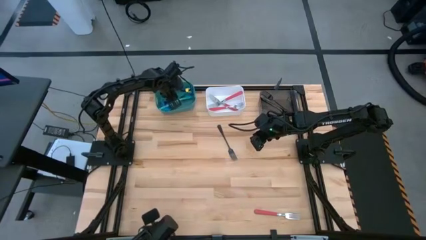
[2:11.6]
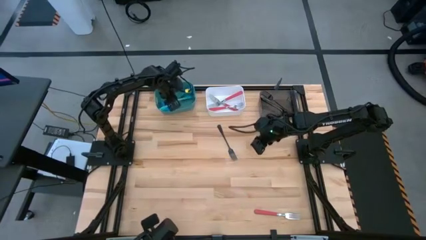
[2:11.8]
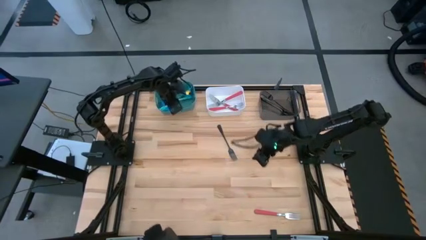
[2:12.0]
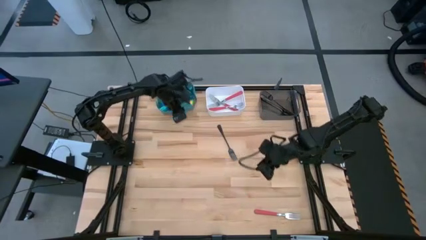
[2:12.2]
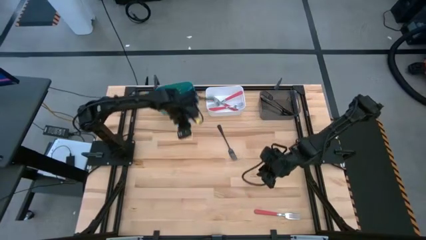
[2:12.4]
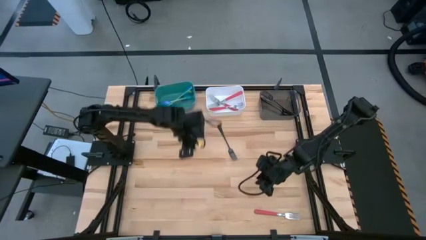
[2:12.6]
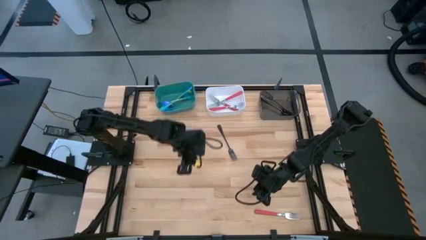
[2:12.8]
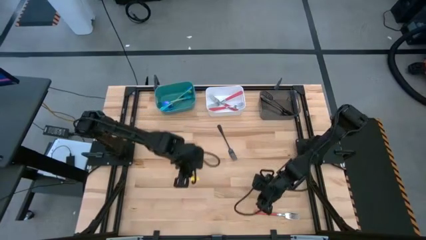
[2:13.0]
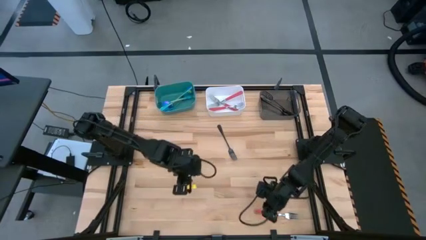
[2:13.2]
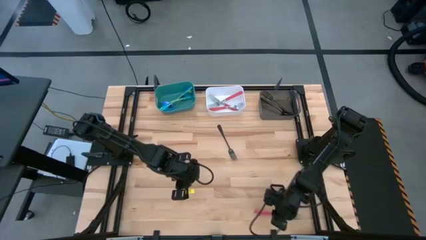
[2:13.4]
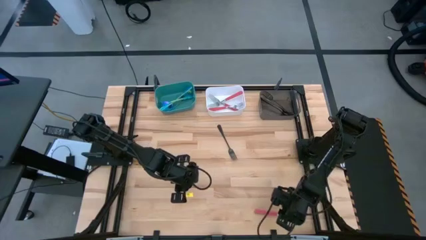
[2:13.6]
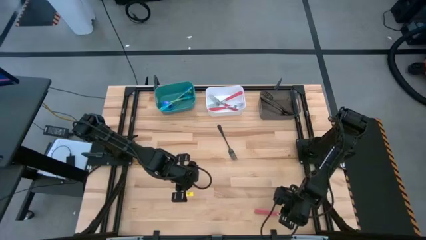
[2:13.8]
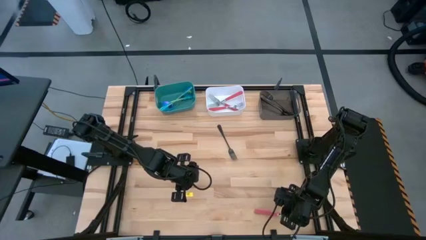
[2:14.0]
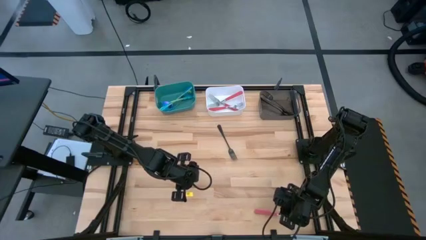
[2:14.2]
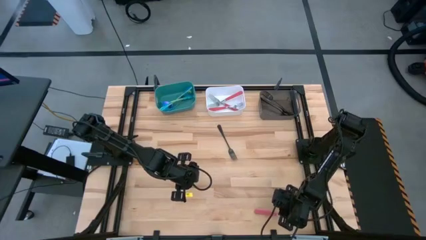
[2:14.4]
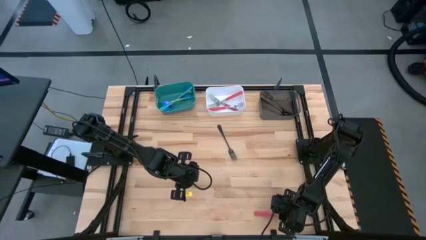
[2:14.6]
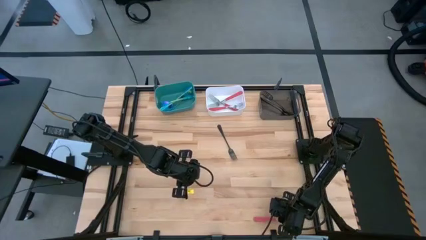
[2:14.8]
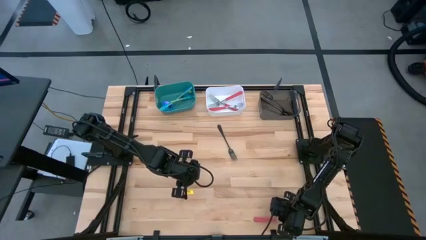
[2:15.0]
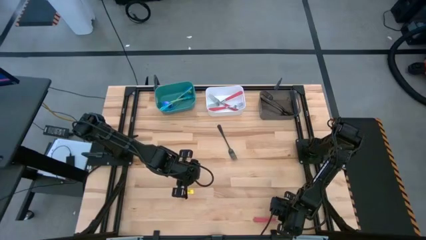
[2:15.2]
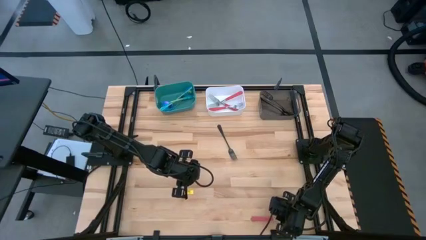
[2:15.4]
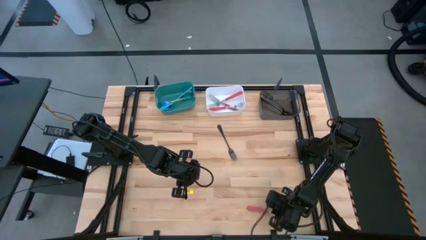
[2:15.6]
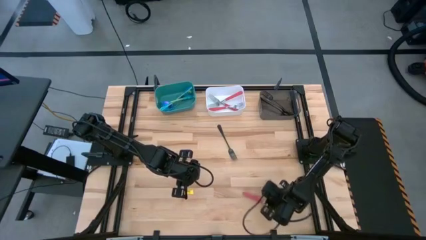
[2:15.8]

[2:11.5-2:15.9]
Task: Sort silverware by color (type)
Put the red fork into the white bin

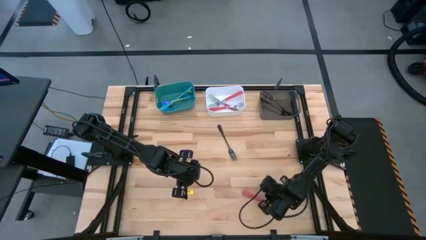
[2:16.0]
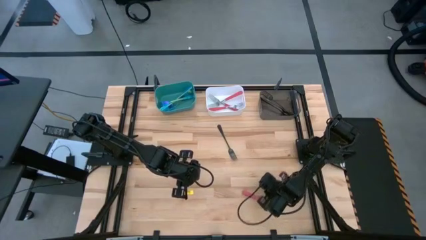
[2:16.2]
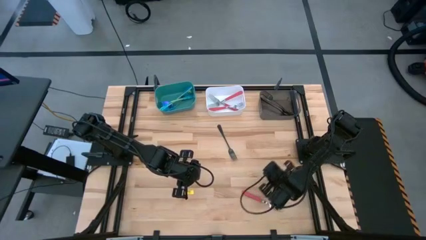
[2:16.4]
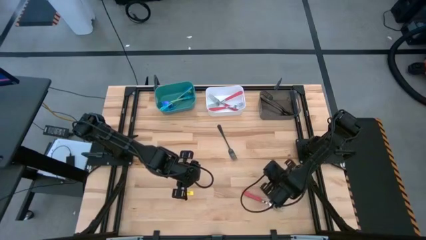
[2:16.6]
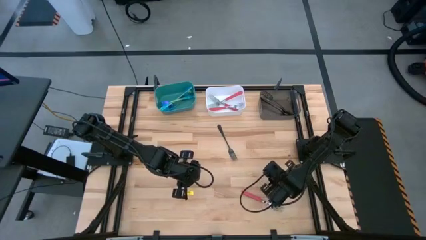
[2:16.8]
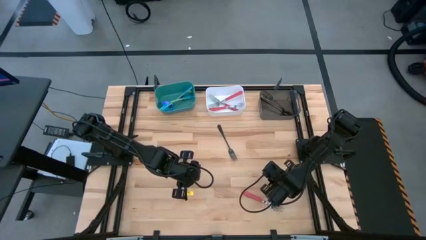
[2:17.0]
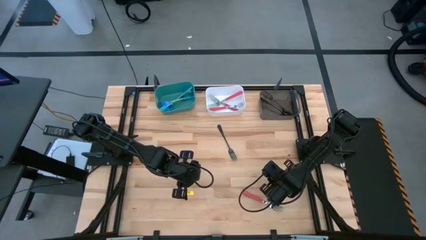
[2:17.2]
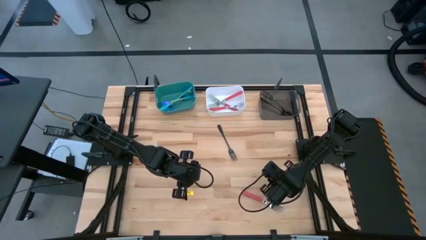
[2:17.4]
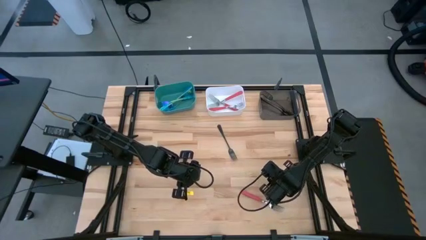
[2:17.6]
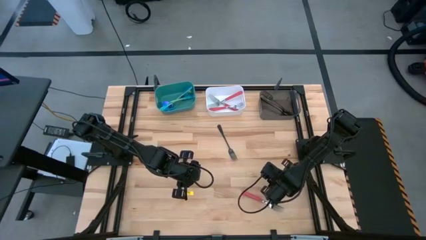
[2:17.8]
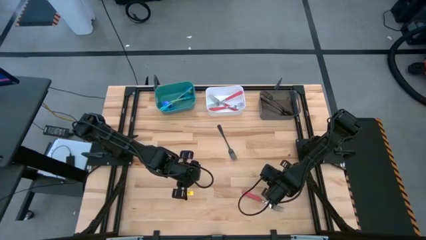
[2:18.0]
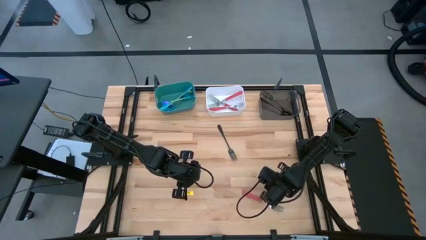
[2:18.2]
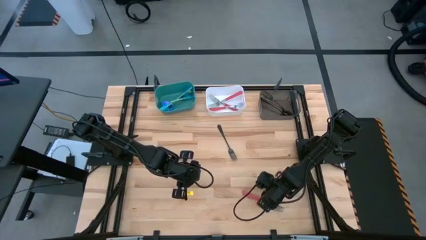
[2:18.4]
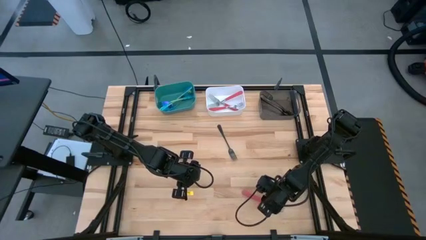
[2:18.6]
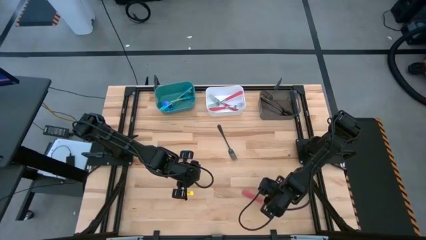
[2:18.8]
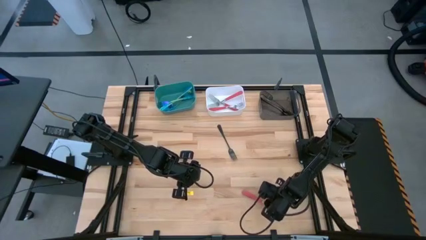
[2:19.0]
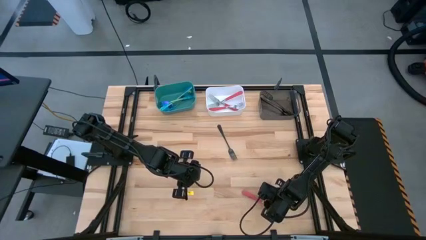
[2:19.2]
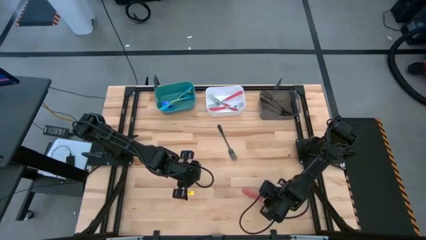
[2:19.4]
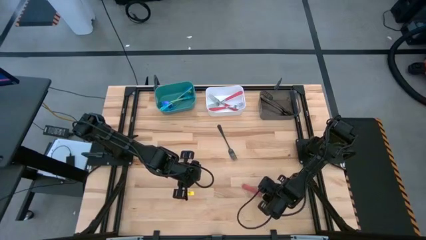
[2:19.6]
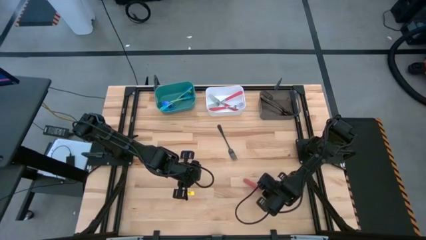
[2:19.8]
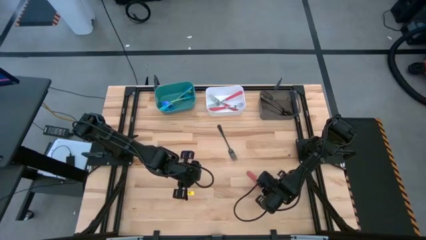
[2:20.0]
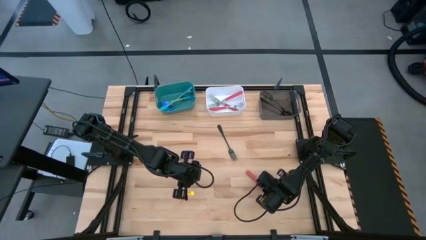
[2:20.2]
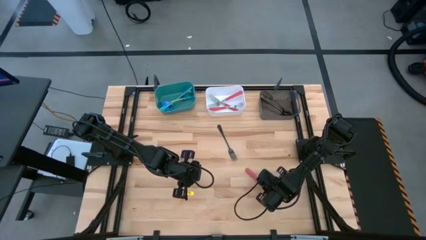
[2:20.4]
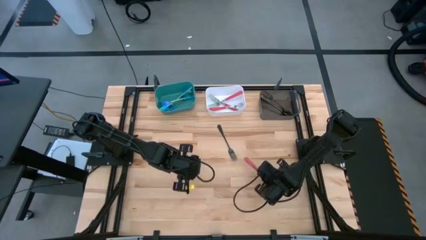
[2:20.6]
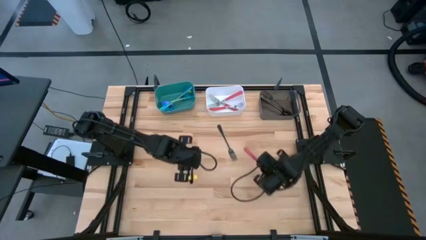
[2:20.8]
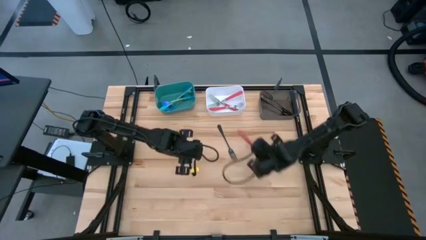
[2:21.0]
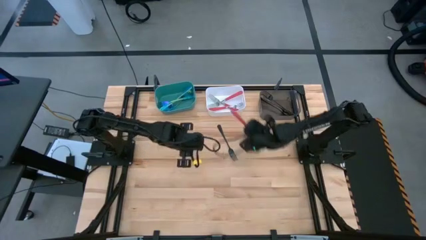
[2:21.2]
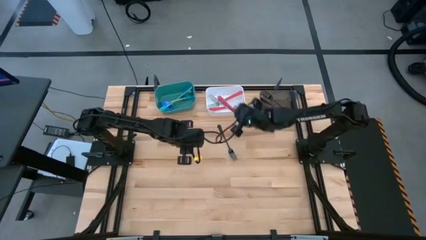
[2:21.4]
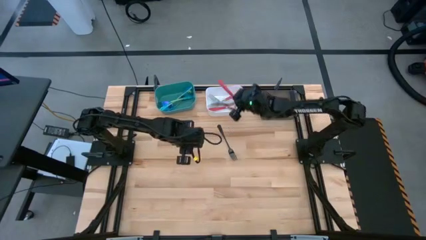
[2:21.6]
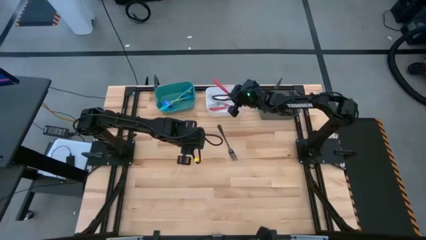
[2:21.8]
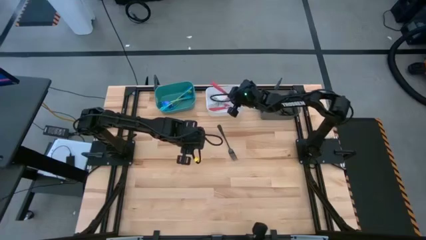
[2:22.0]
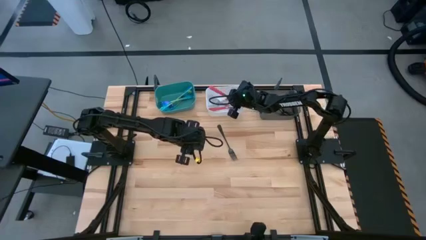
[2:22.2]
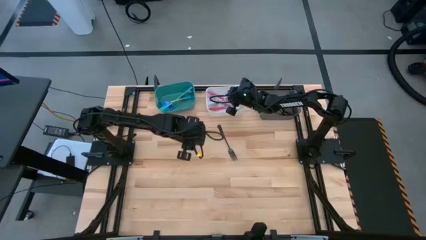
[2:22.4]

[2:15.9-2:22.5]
Put the red fork into the white bin

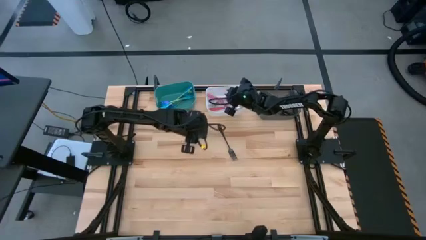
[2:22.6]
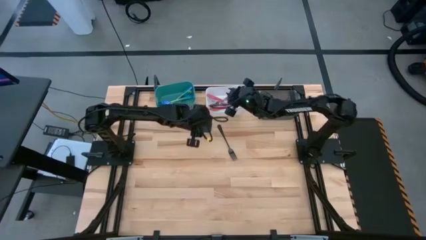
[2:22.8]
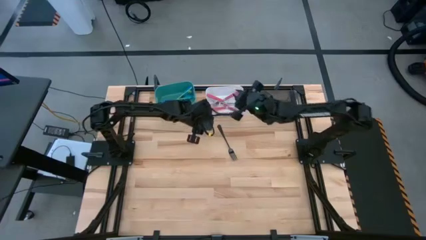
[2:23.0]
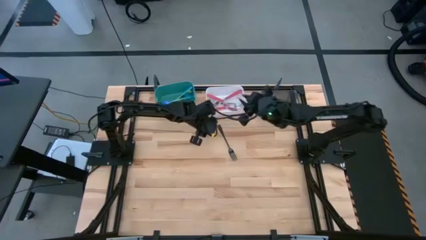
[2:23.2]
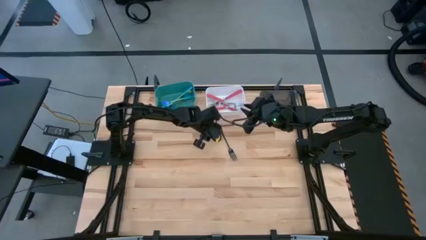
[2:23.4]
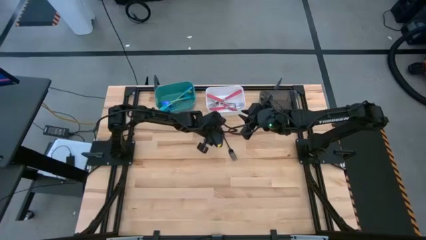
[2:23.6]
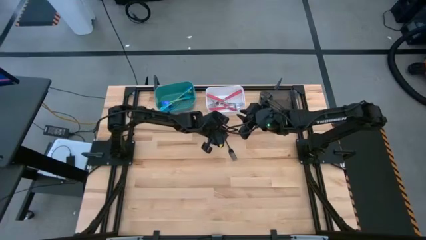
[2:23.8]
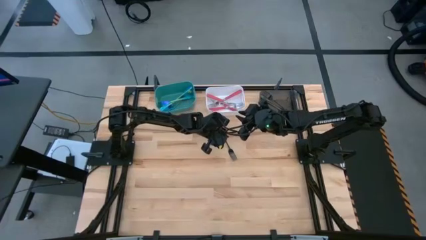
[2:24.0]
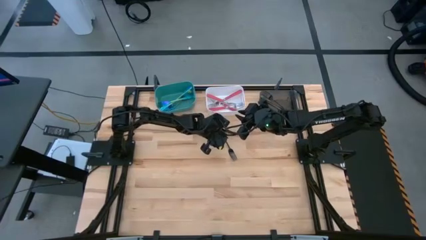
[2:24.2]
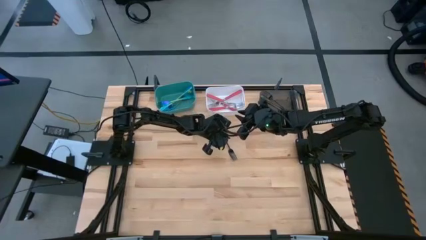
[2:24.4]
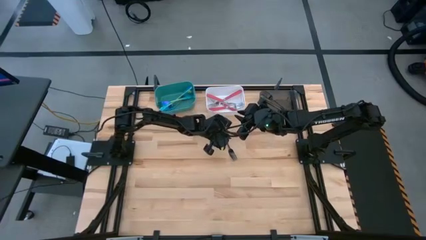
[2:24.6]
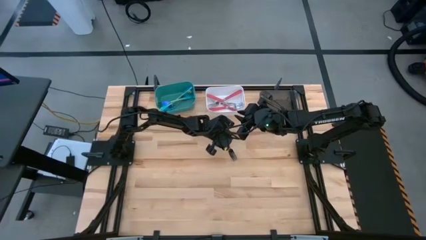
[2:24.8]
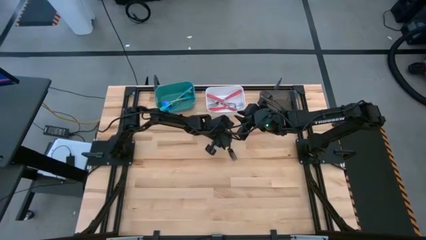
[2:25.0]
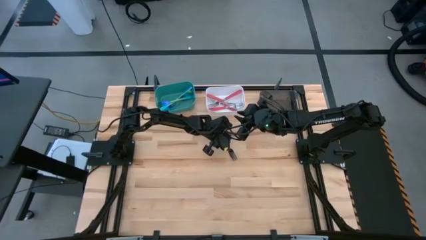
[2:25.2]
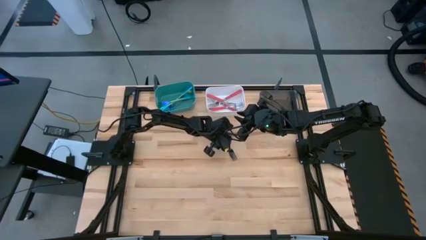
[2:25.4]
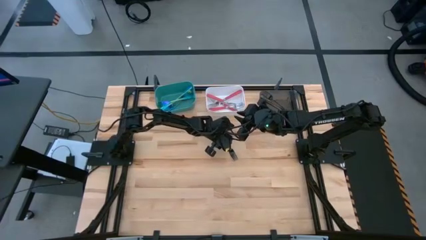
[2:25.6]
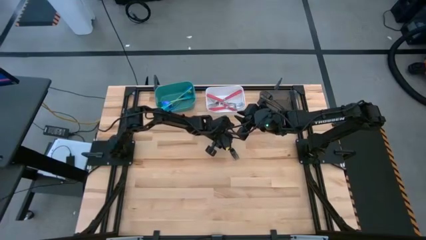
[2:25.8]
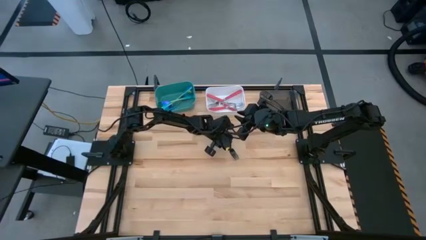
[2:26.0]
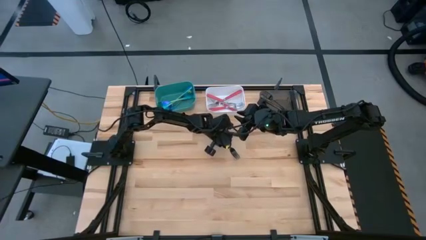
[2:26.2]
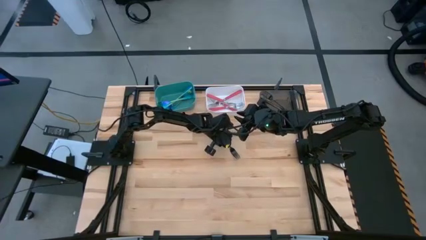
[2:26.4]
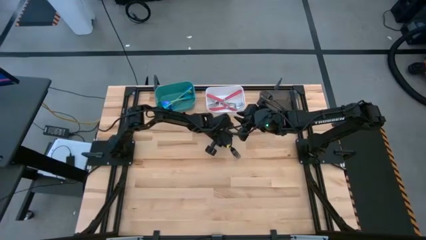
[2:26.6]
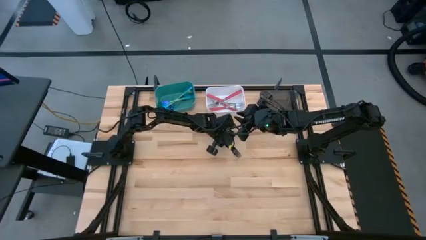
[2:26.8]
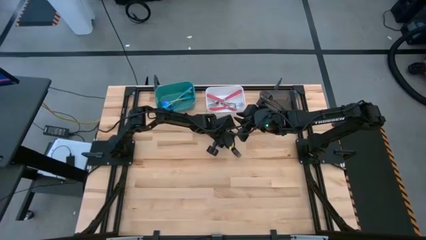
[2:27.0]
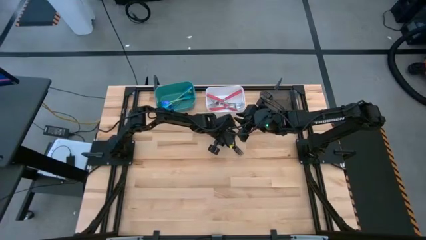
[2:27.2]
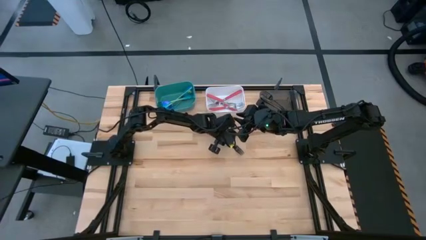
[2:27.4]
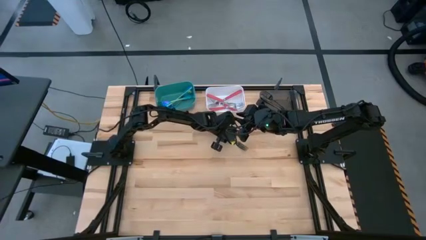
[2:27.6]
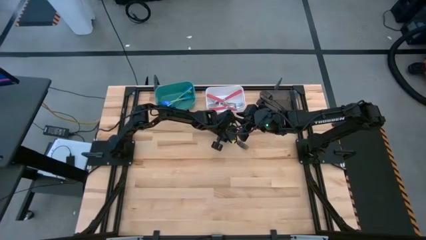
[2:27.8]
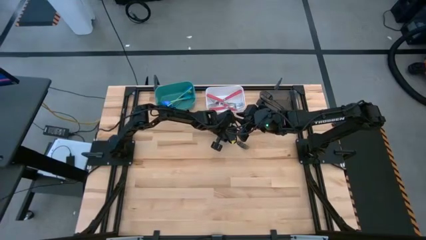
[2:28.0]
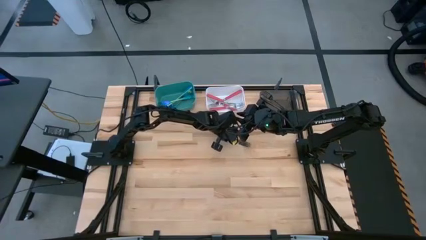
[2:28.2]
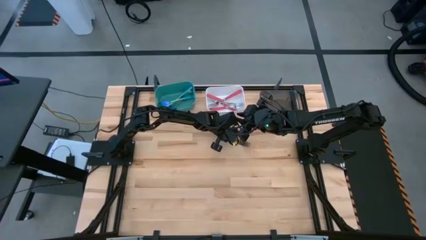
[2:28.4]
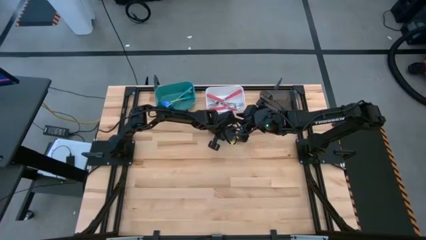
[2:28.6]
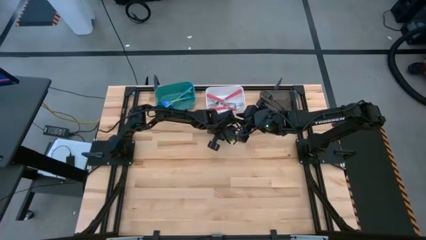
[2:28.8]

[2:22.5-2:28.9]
Put the black fork into the black bin
